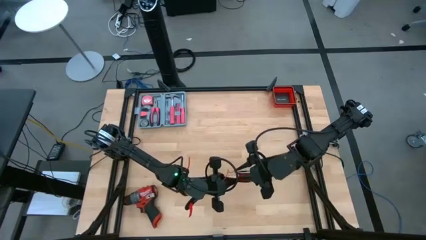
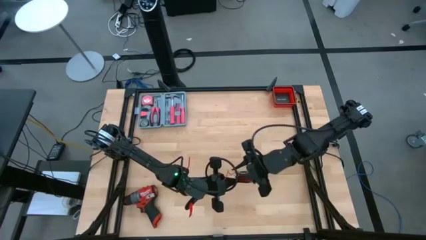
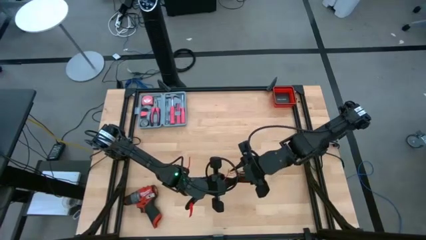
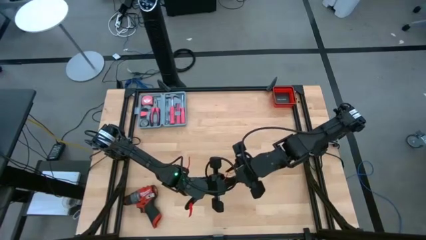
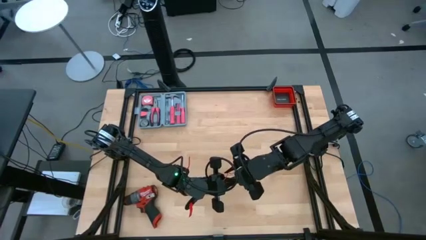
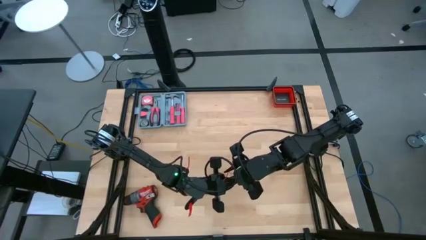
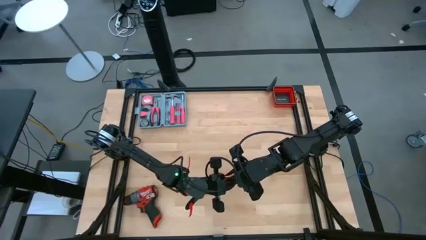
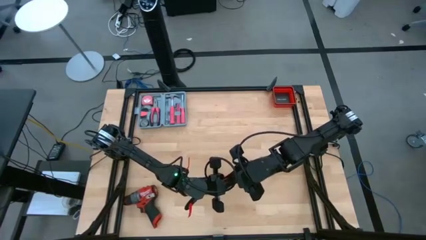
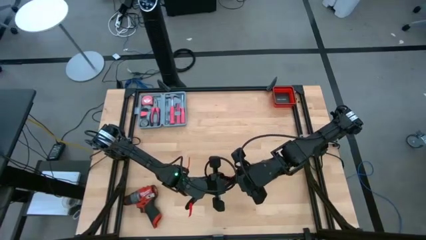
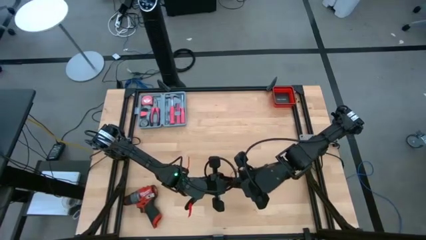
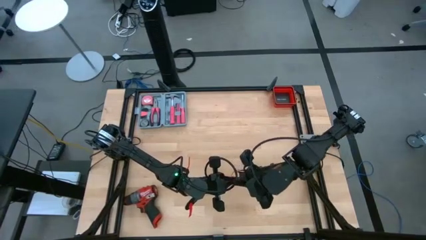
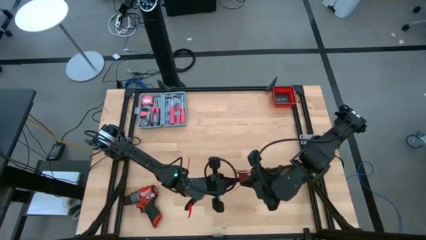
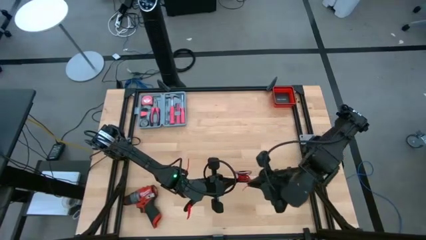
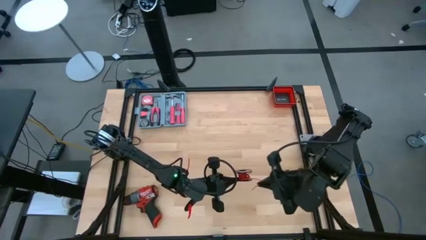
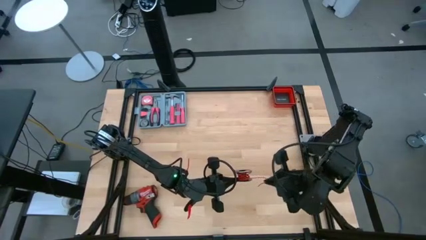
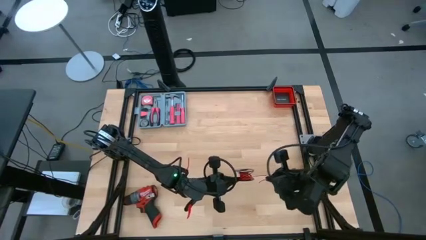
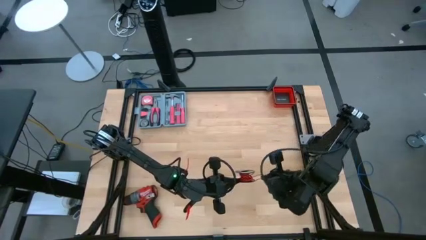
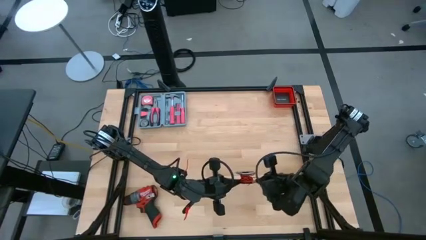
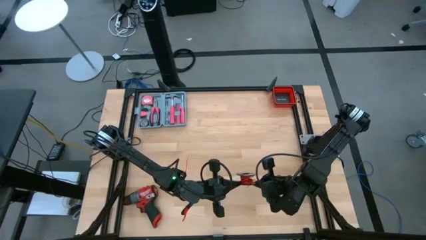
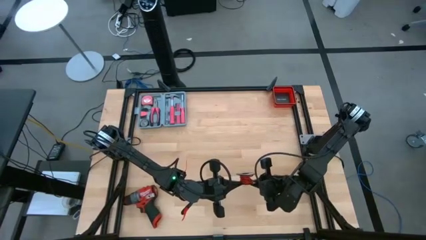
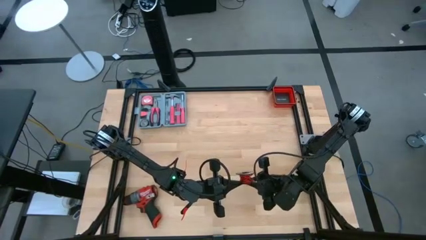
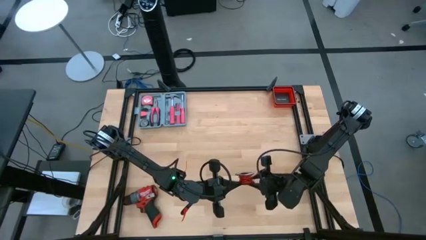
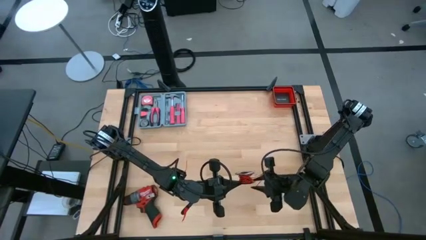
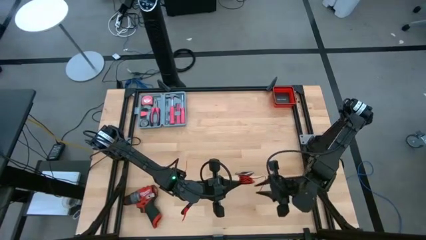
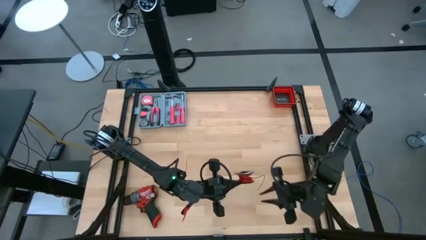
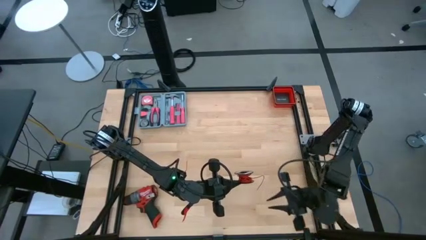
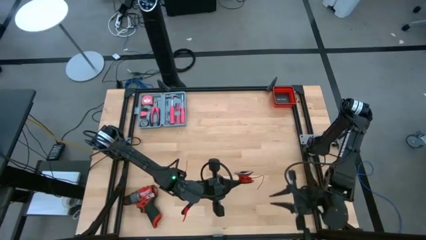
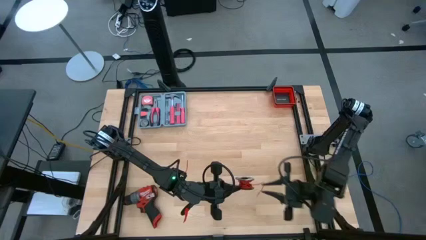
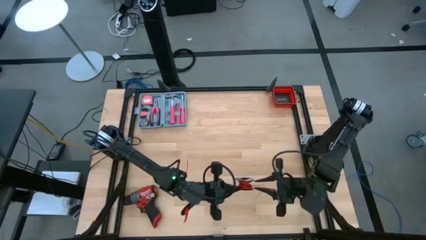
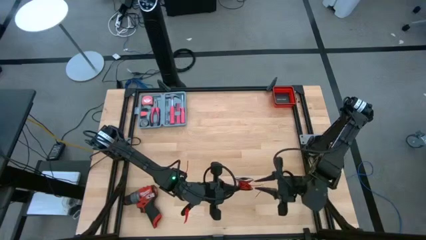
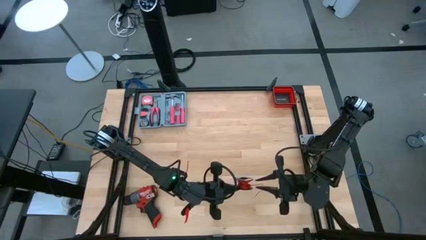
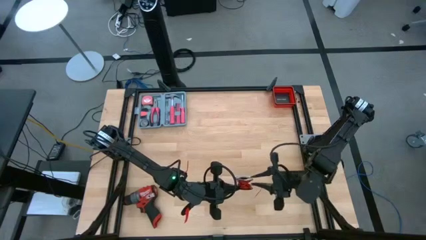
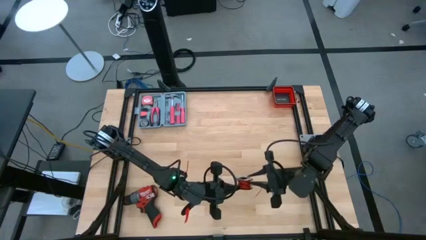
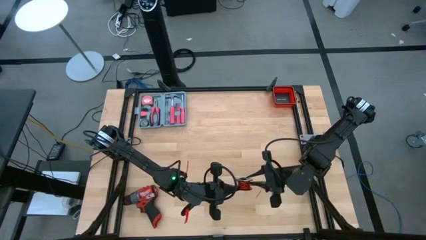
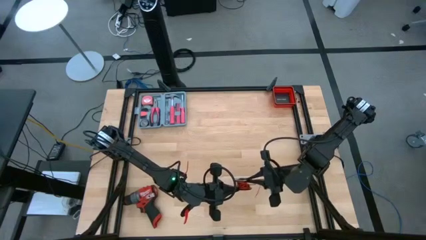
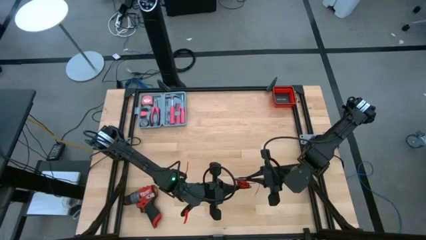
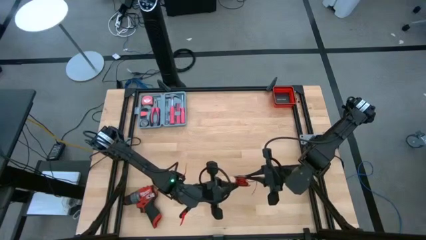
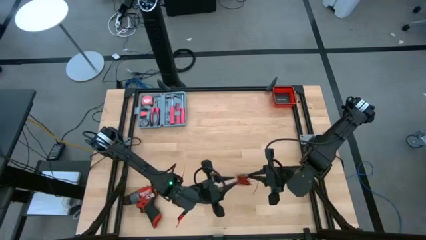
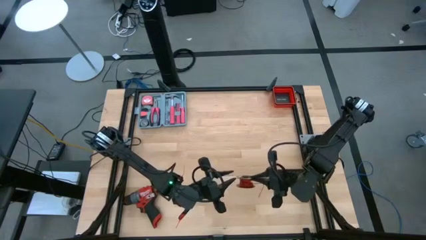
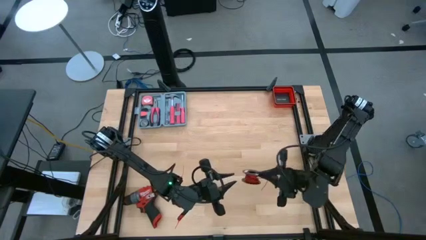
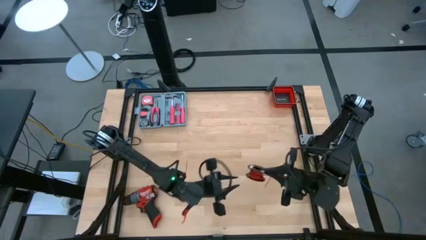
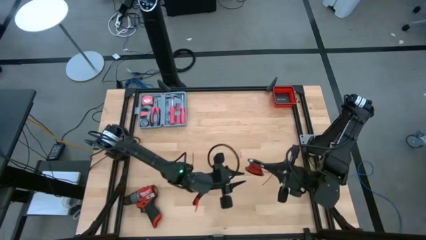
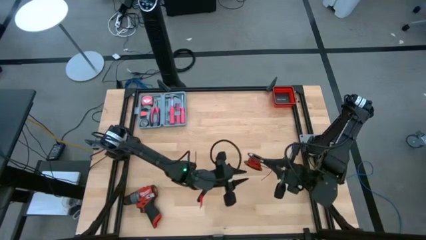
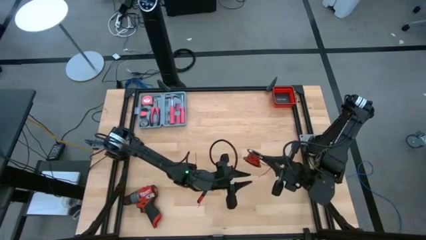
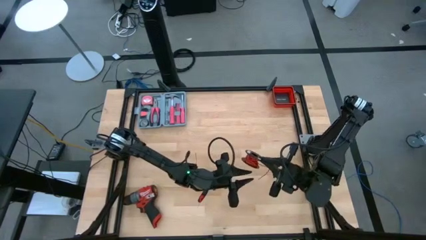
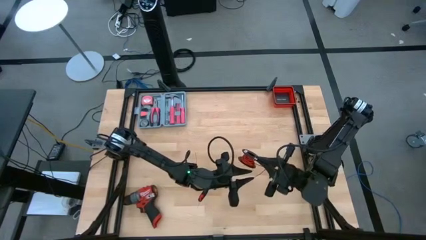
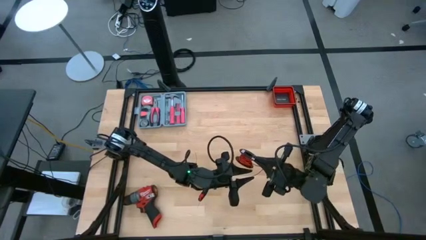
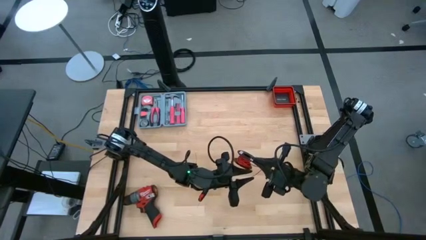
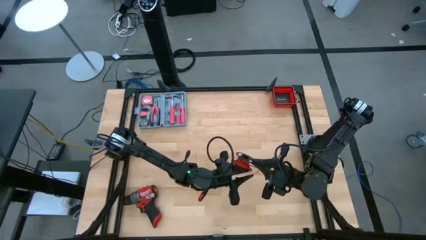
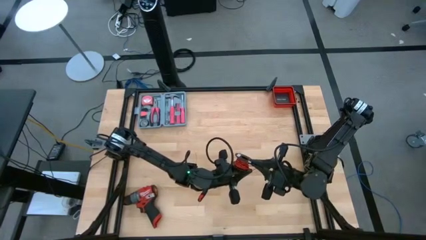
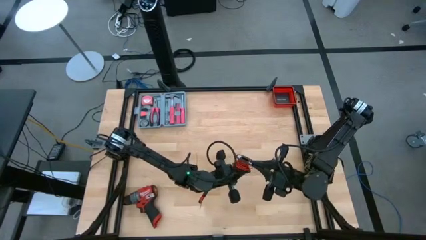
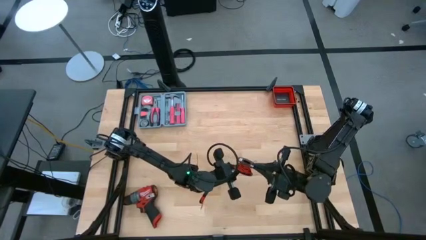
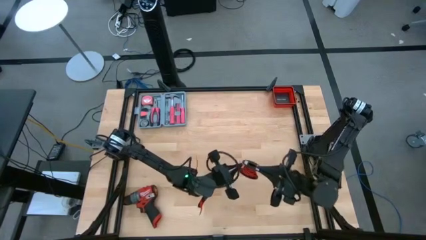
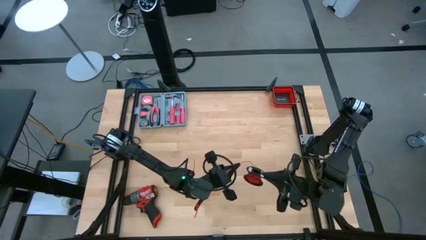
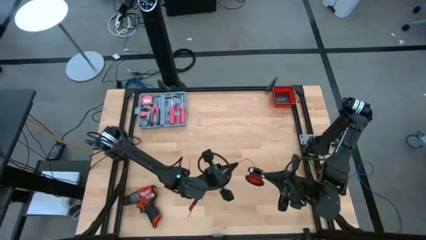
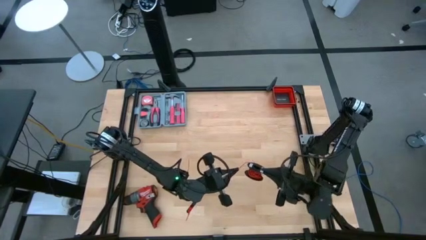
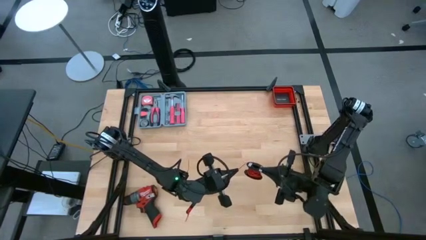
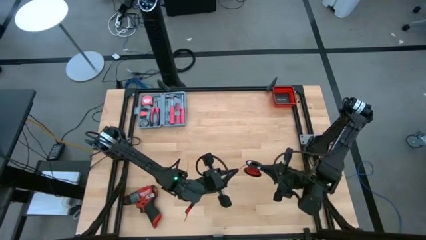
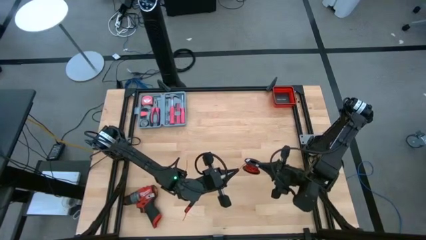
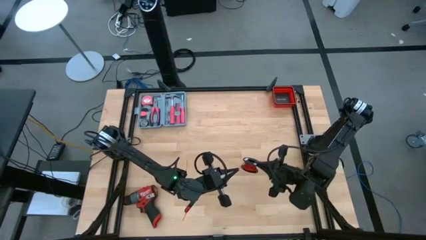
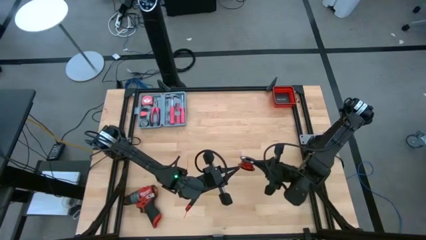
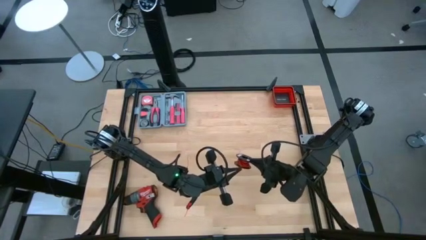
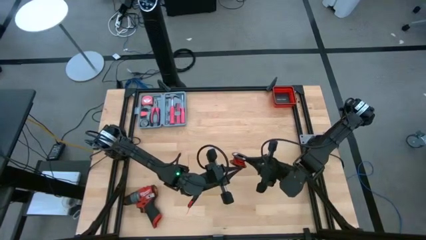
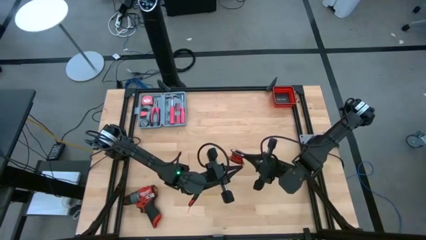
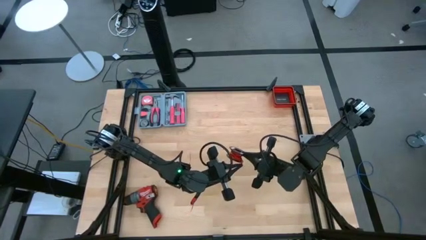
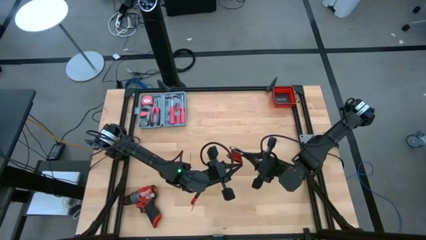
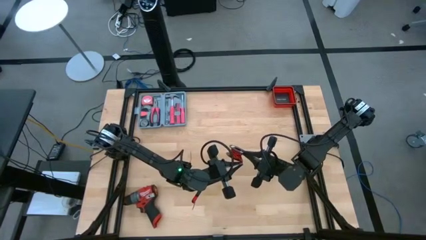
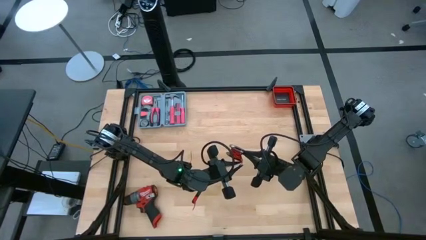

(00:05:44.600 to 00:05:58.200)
Task: Coil cords
Coil the red wire on the black spool
